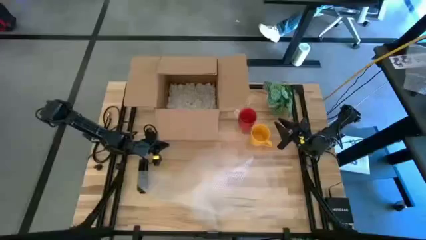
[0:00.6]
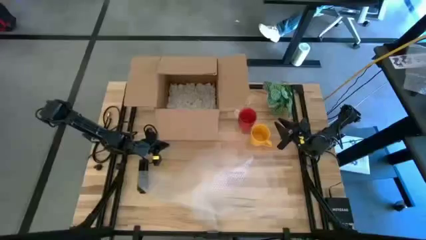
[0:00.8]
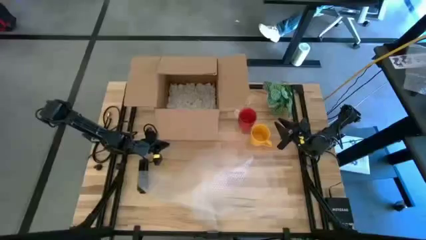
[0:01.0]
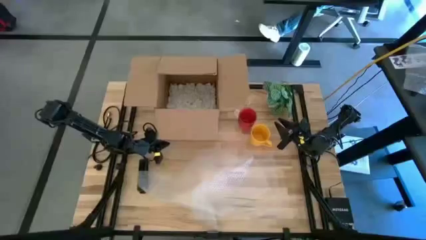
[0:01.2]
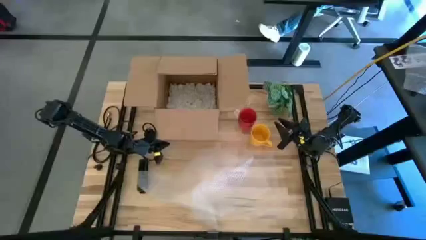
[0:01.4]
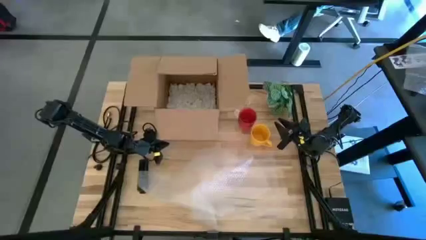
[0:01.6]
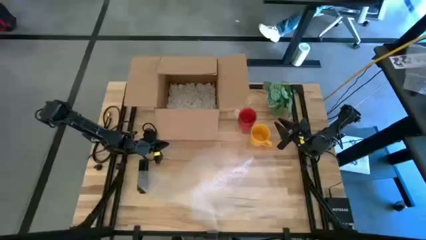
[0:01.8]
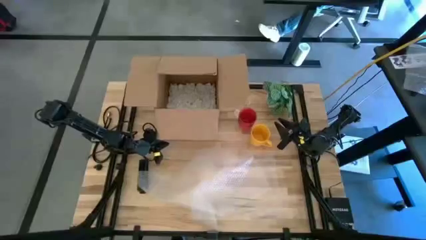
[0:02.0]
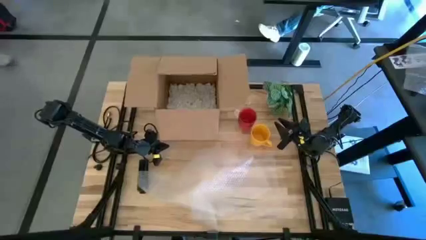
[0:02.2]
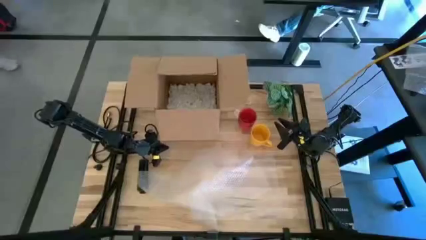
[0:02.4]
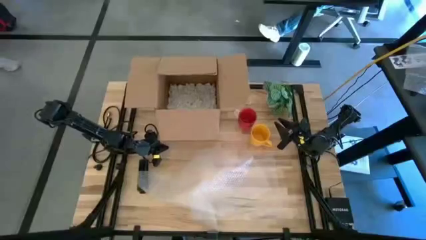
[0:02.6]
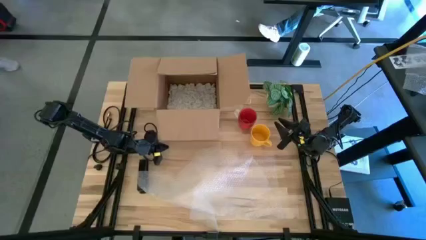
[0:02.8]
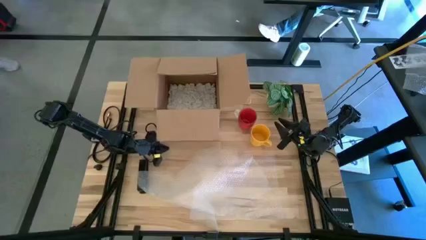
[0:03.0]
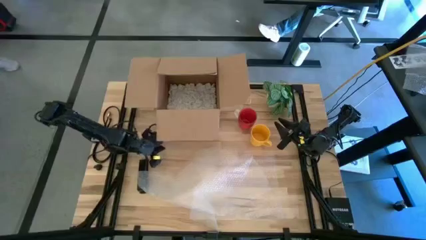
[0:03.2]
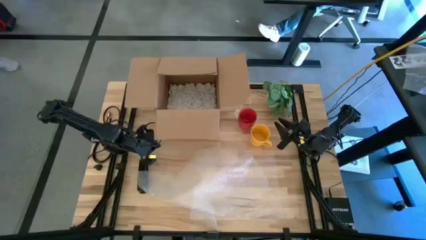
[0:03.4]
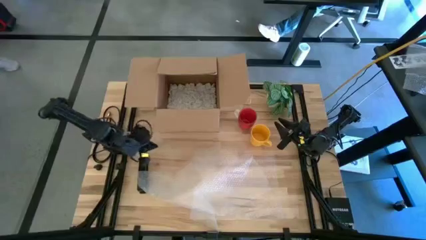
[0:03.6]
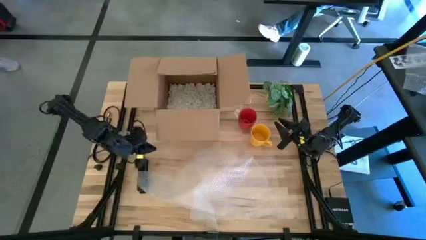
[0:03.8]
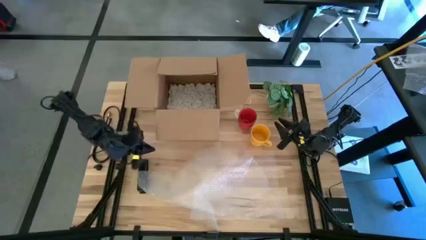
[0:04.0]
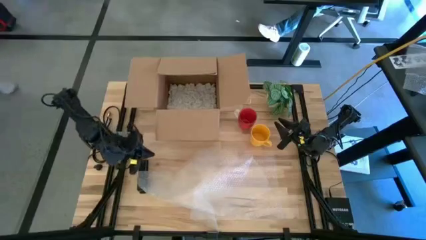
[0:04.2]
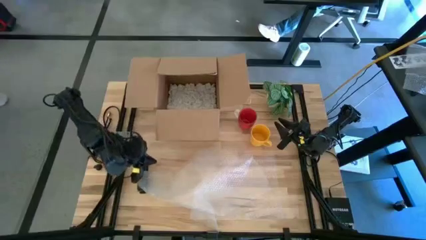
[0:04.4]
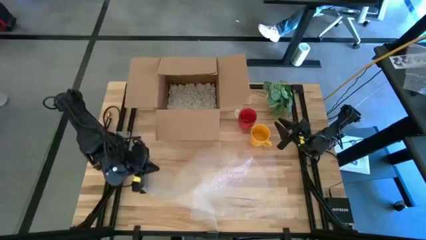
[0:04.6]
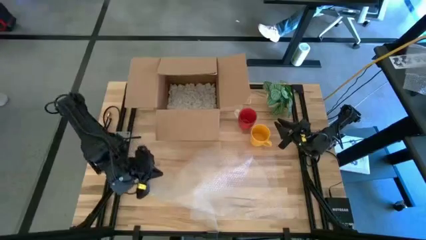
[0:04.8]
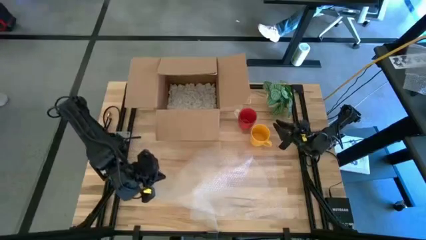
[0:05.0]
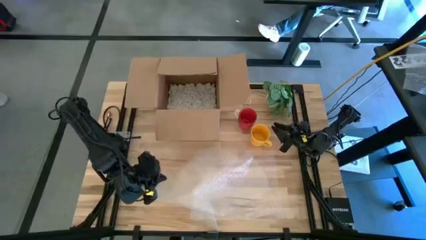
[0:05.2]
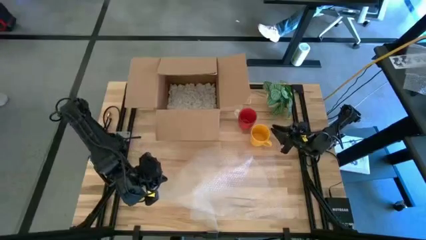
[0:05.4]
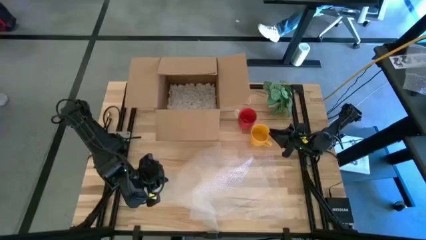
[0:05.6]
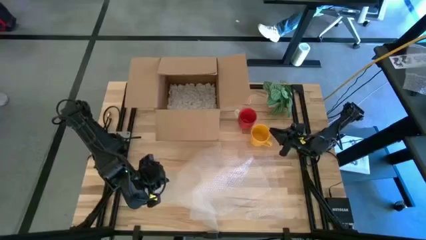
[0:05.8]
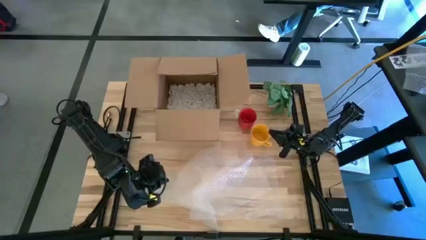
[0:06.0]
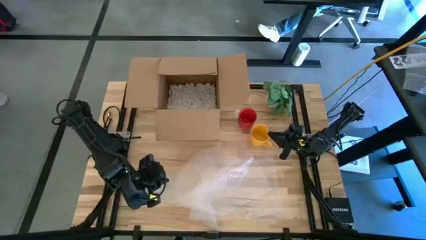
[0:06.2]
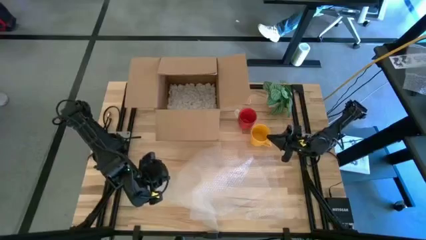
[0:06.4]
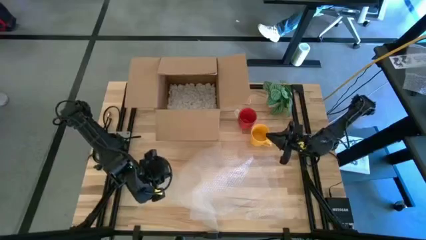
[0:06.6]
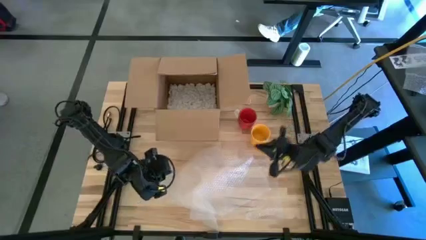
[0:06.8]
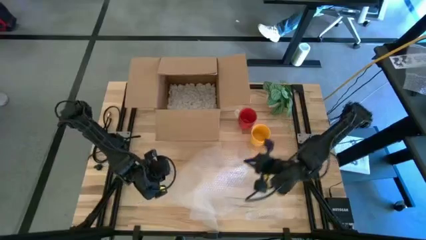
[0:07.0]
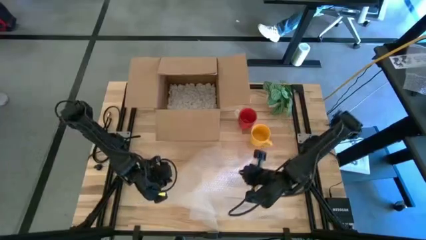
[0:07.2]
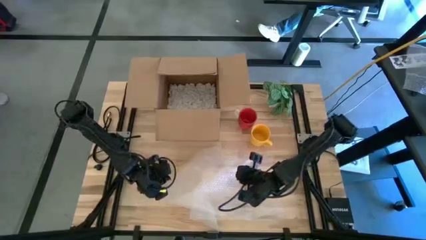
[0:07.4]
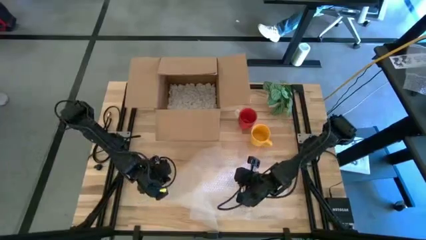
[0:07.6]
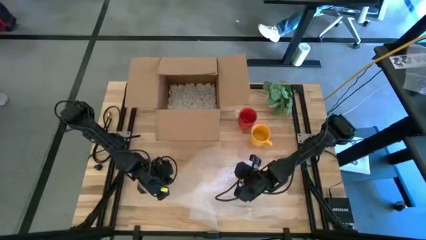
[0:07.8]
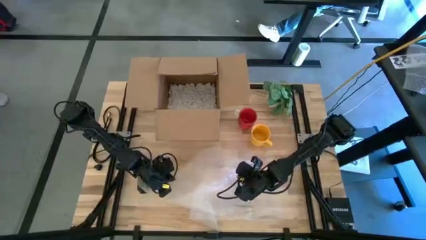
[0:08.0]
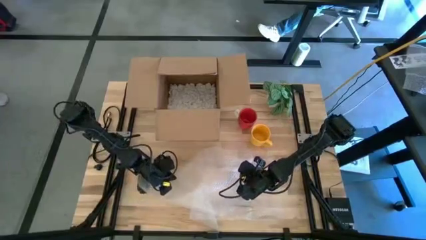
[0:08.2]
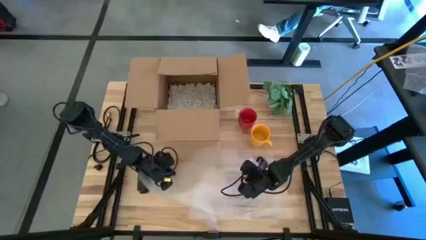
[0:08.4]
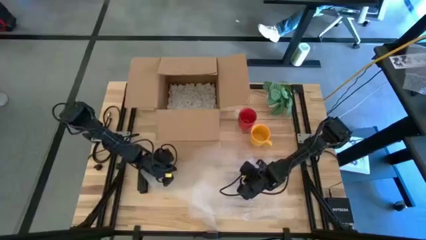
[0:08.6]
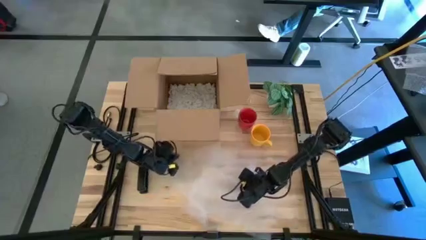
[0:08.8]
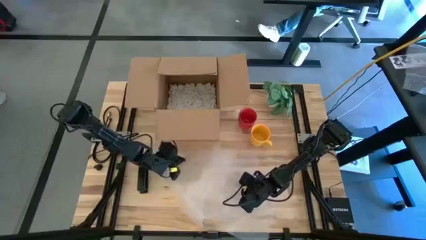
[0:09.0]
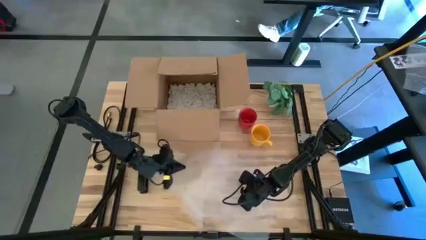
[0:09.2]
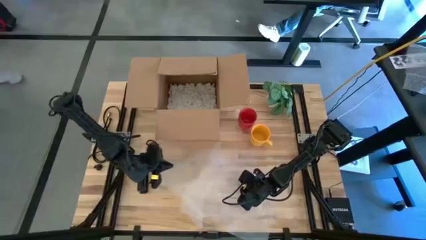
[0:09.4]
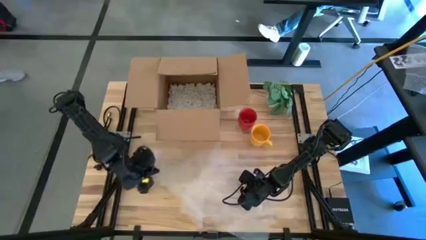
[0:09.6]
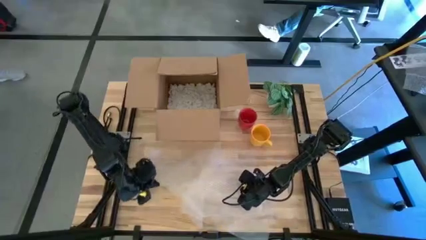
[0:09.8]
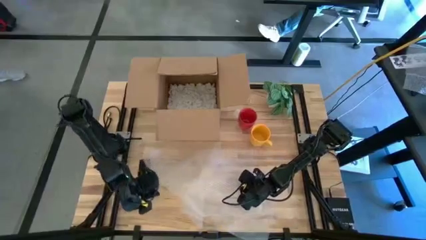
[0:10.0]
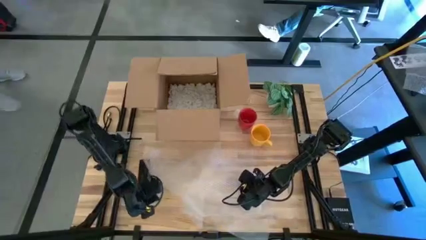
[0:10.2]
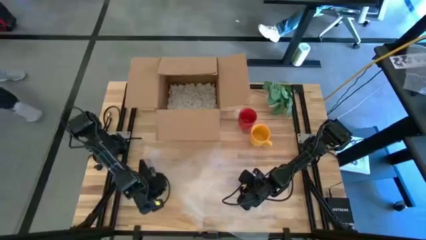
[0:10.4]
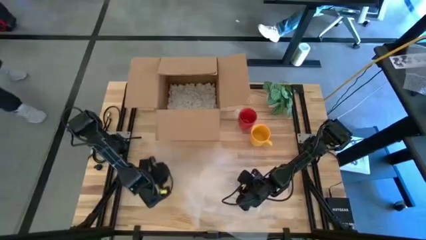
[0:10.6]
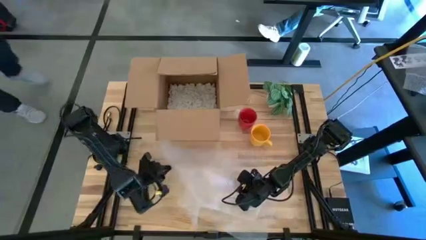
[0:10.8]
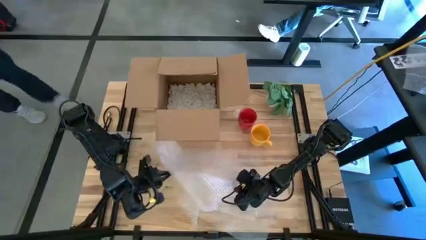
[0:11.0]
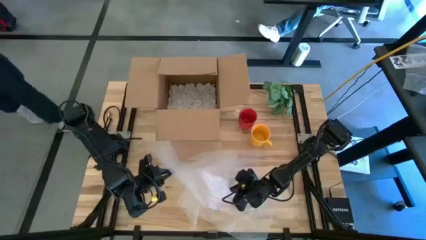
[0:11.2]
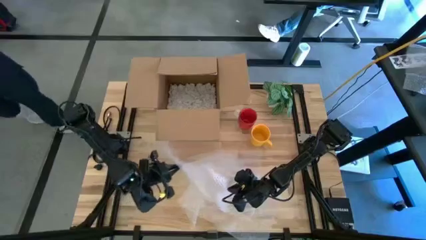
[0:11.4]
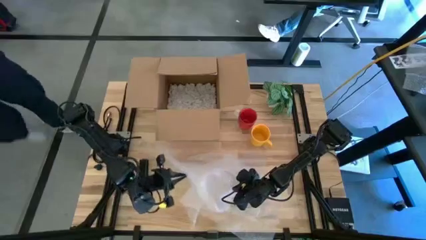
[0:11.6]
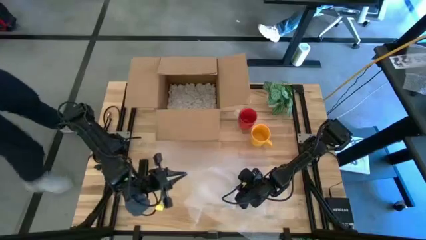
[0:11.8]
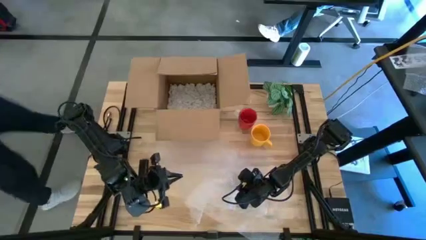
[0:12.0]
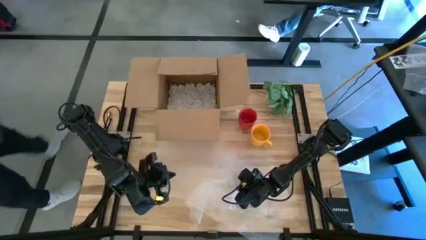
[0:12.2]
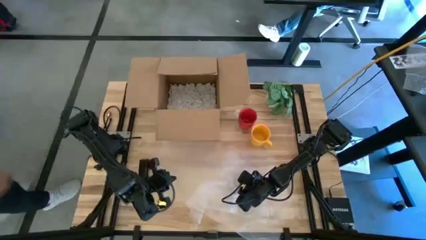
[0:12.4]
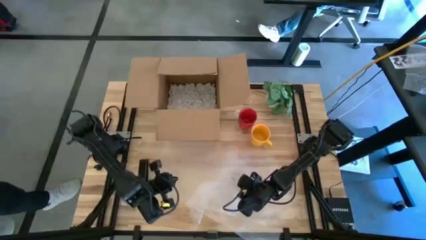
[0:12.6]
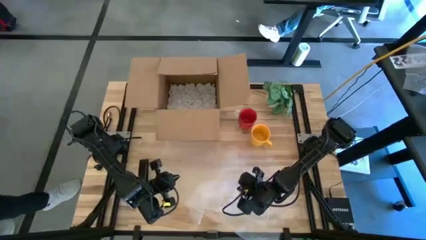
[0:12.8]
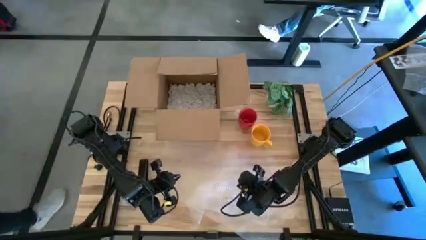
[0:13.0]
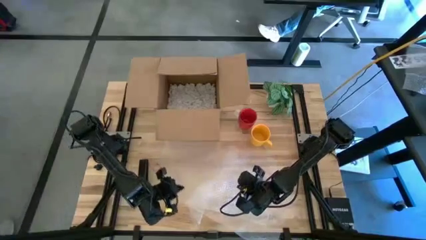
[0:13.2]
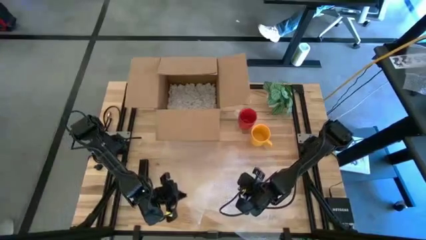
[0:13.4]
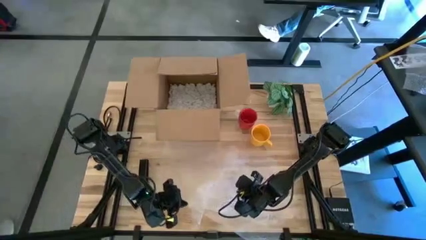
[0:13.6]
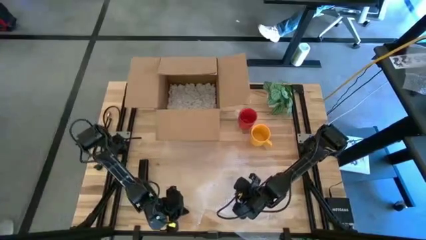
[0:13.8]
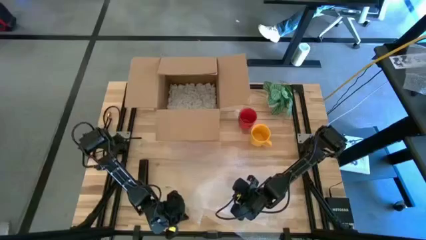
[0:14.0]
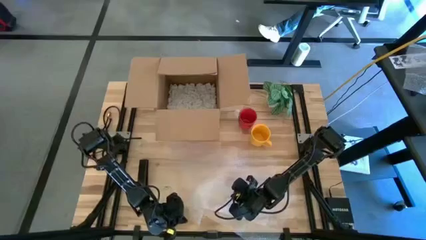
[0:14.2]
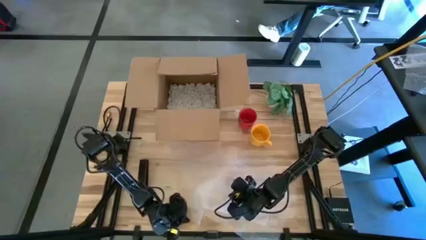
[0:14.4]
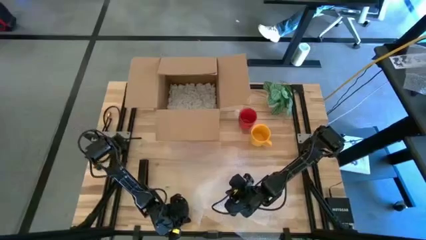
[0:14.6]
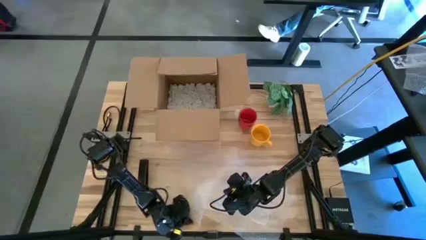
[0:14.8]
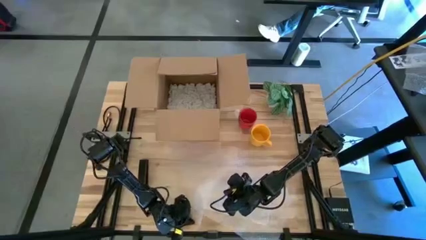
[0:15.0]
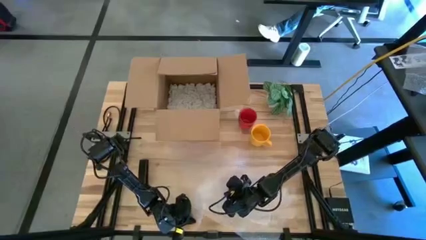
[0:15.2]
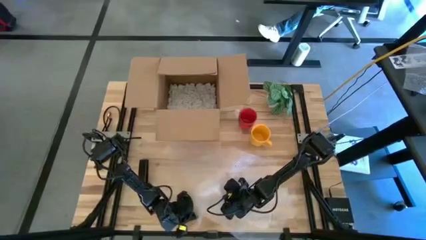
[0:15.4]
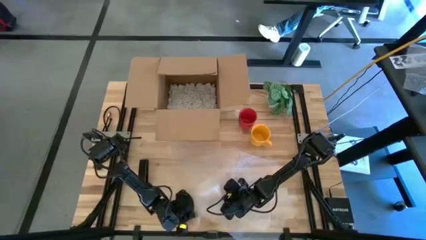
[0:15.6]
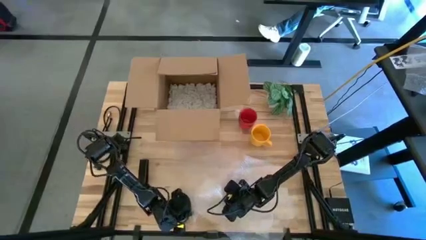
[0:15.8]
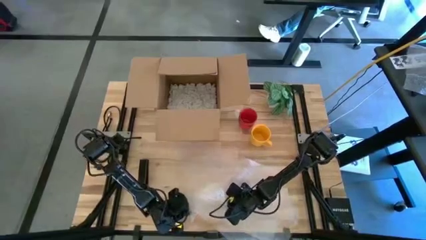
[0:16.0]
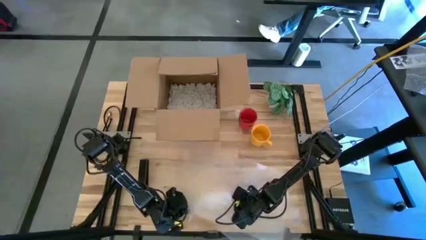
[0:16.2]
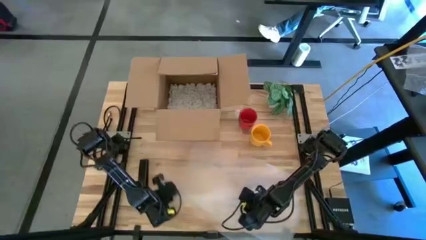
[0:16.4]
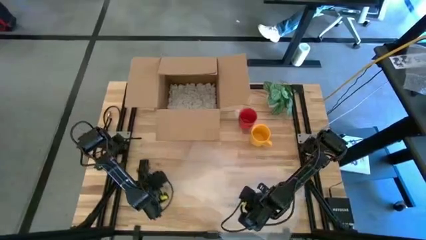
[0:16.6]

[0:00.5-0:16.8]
Task: wrap mug
Wrap the yellow mug with bubble wrap
